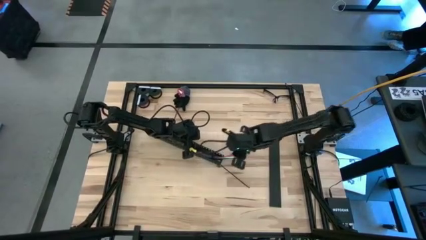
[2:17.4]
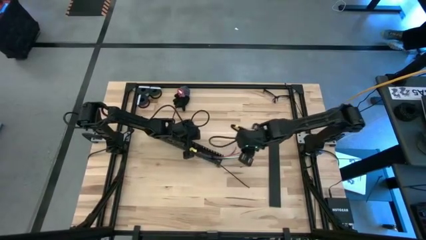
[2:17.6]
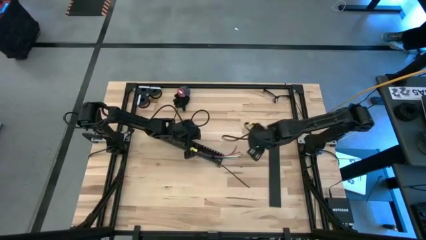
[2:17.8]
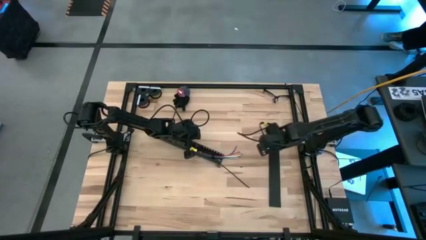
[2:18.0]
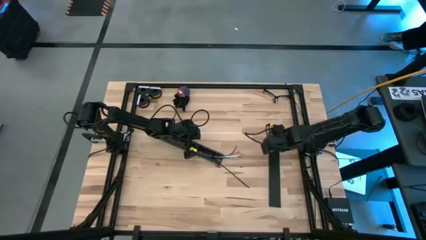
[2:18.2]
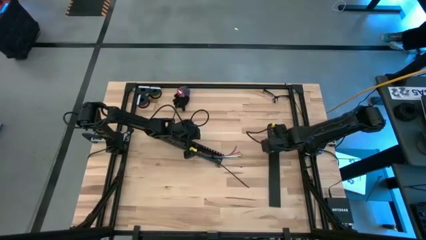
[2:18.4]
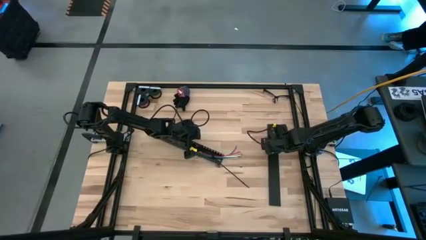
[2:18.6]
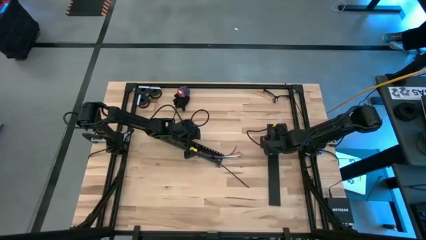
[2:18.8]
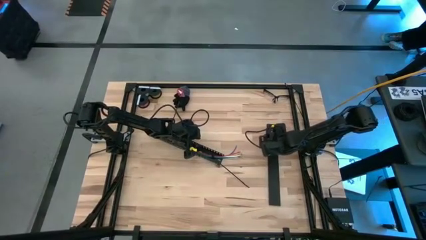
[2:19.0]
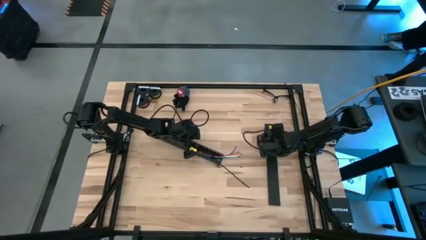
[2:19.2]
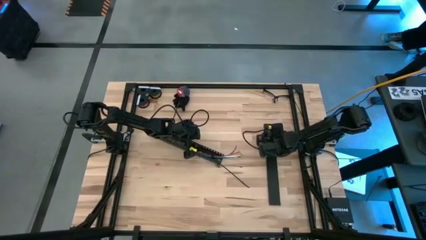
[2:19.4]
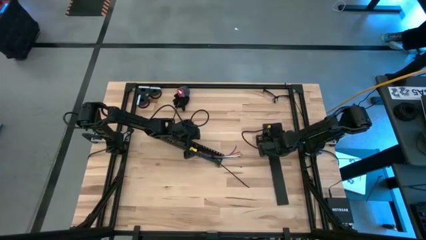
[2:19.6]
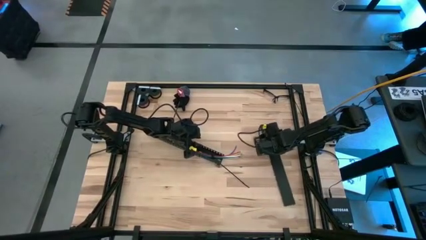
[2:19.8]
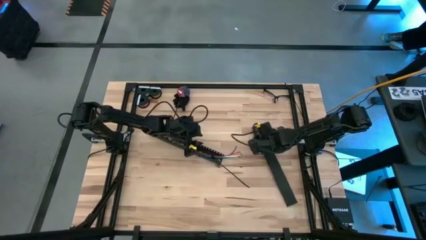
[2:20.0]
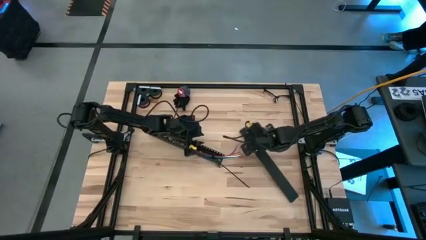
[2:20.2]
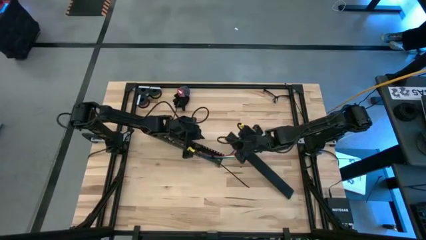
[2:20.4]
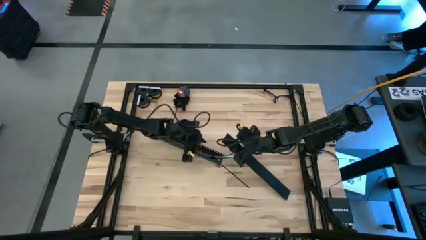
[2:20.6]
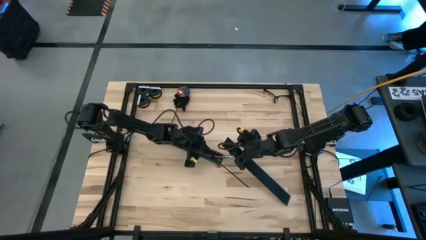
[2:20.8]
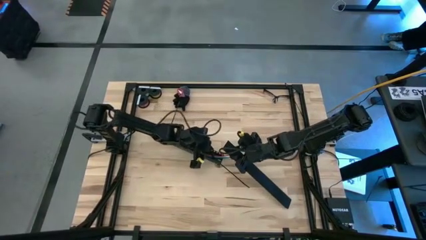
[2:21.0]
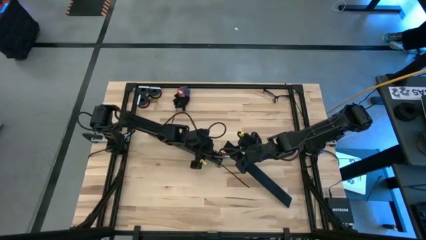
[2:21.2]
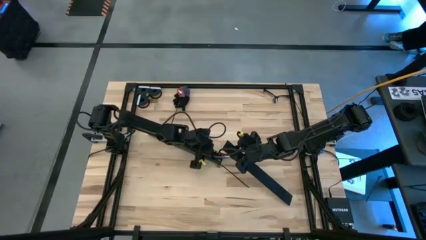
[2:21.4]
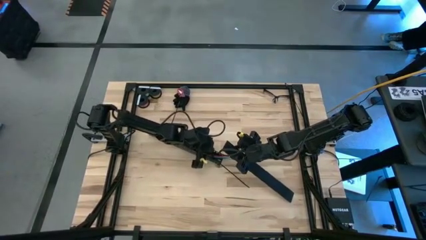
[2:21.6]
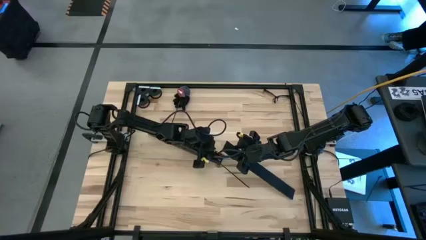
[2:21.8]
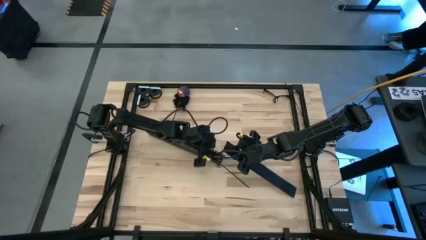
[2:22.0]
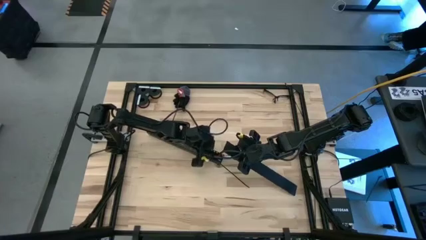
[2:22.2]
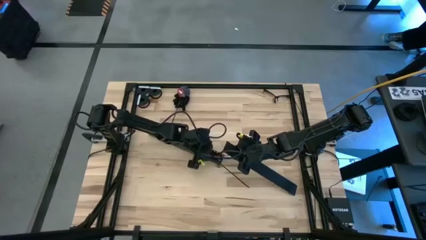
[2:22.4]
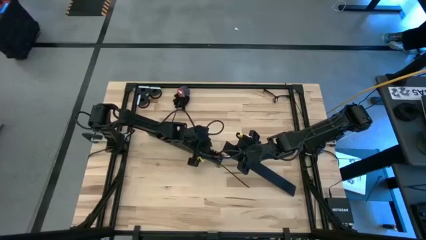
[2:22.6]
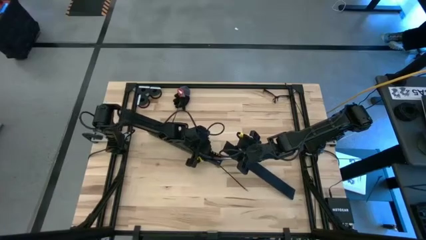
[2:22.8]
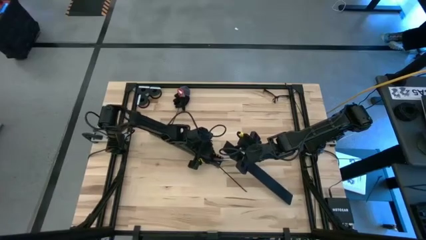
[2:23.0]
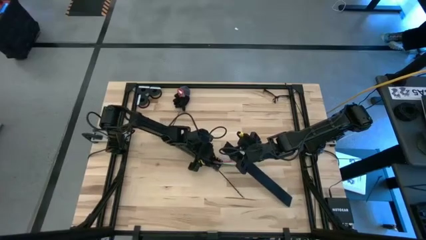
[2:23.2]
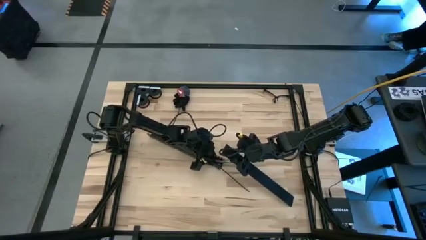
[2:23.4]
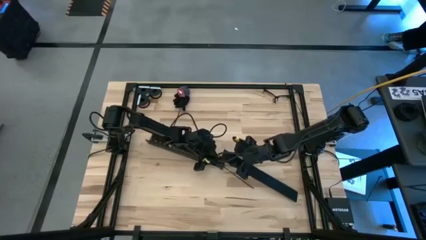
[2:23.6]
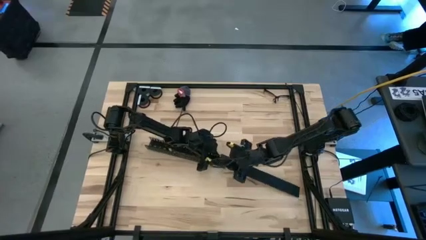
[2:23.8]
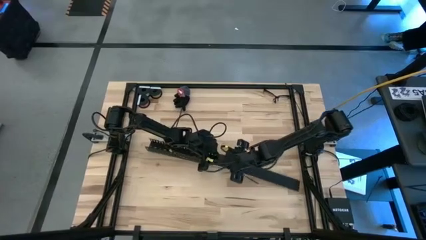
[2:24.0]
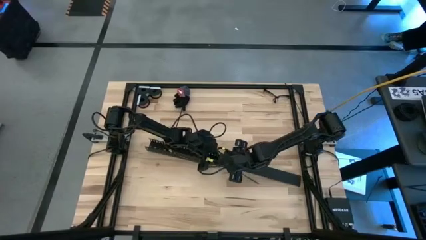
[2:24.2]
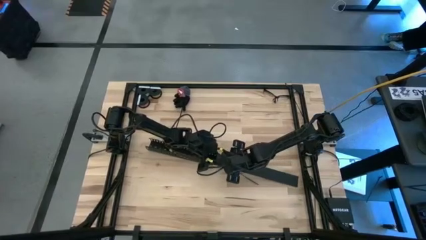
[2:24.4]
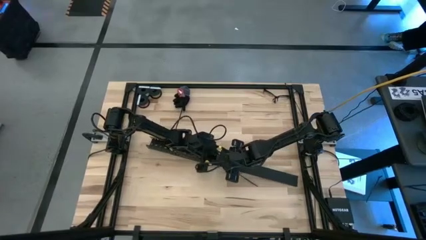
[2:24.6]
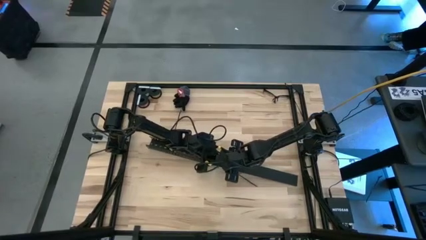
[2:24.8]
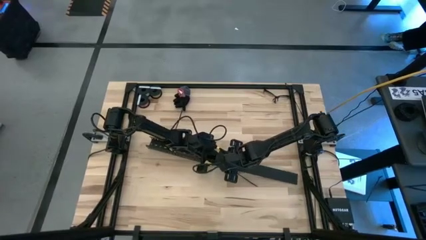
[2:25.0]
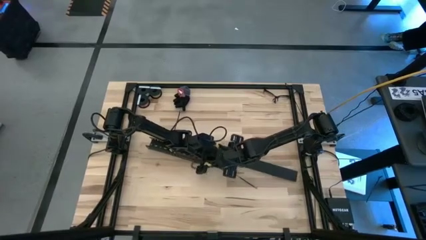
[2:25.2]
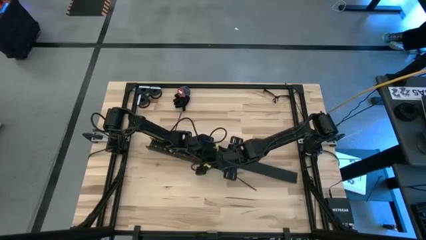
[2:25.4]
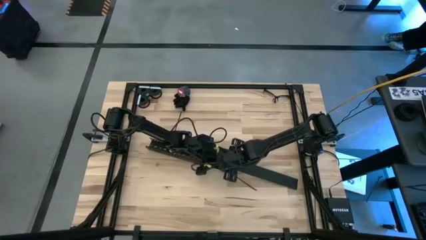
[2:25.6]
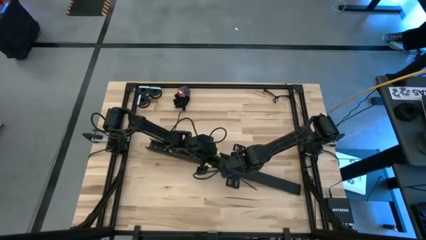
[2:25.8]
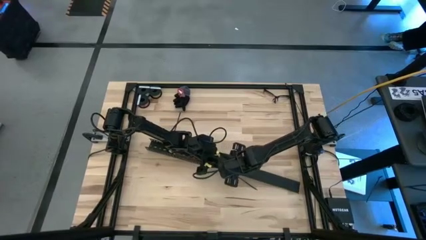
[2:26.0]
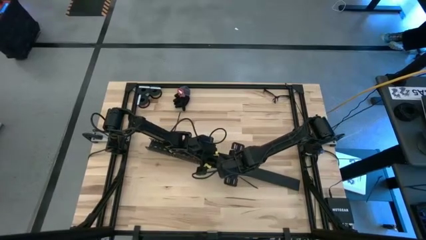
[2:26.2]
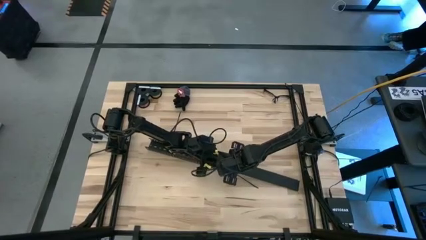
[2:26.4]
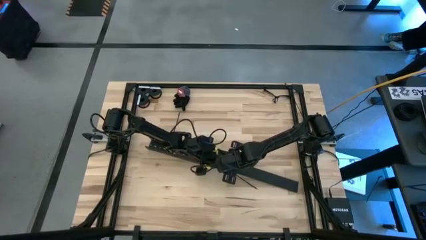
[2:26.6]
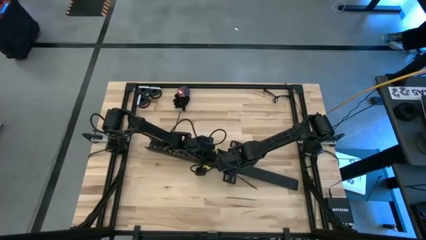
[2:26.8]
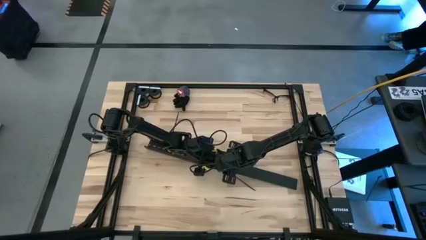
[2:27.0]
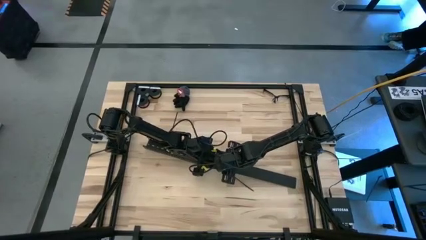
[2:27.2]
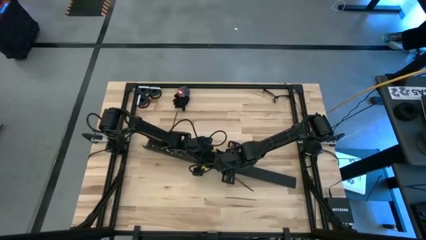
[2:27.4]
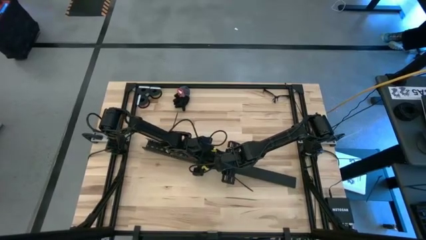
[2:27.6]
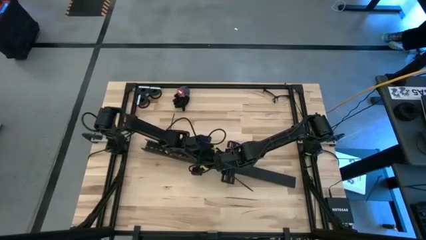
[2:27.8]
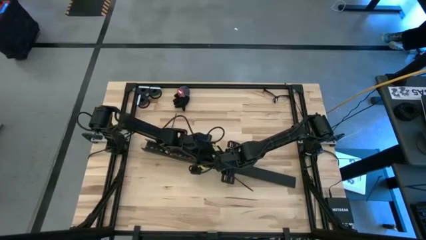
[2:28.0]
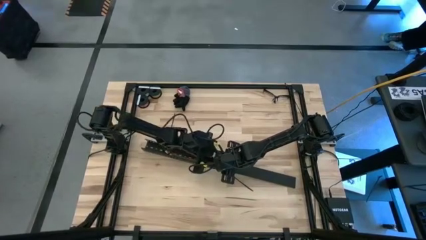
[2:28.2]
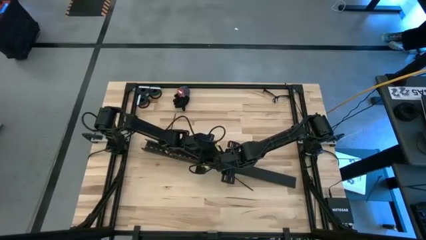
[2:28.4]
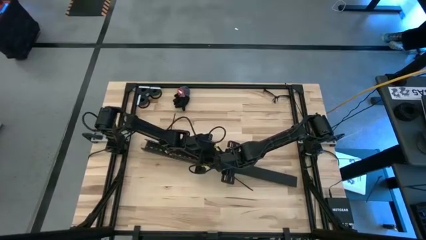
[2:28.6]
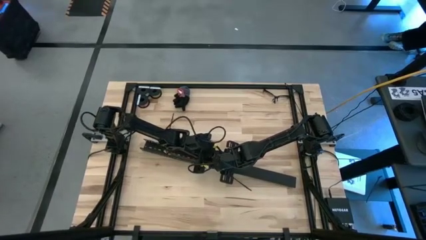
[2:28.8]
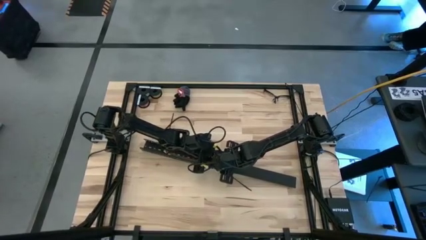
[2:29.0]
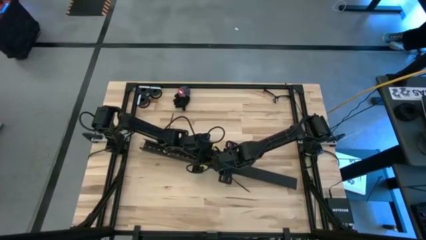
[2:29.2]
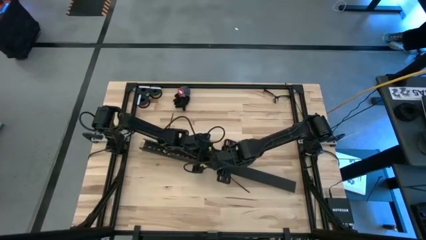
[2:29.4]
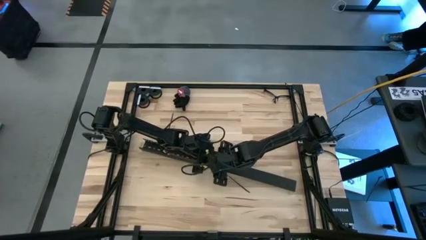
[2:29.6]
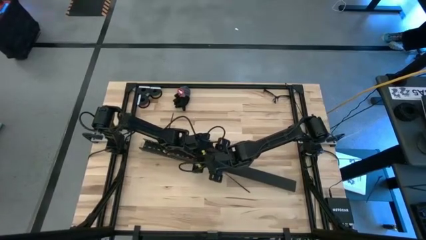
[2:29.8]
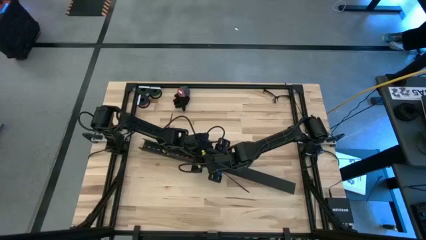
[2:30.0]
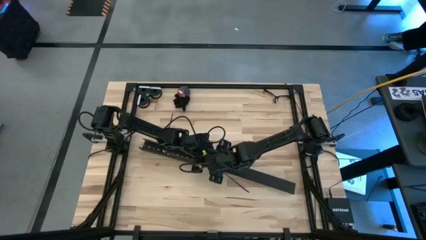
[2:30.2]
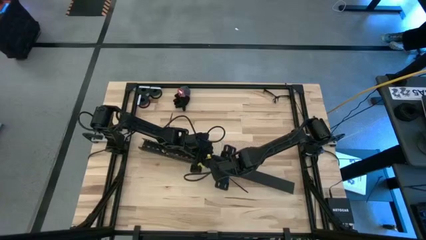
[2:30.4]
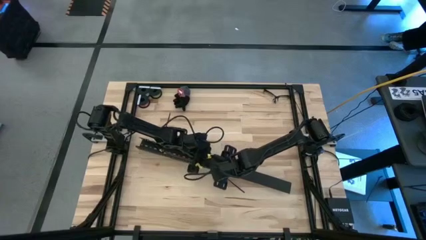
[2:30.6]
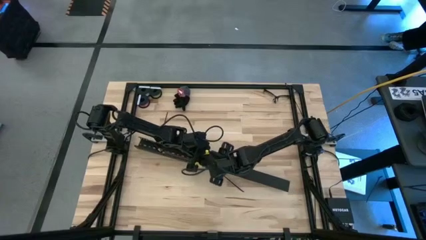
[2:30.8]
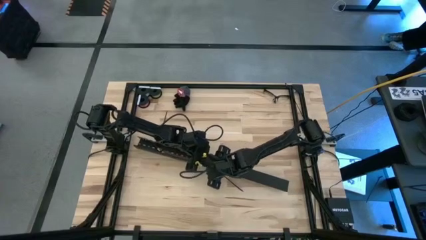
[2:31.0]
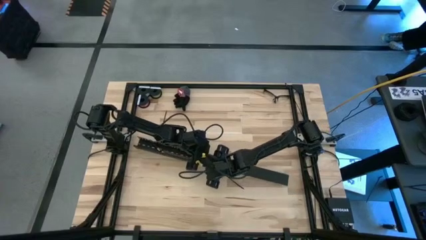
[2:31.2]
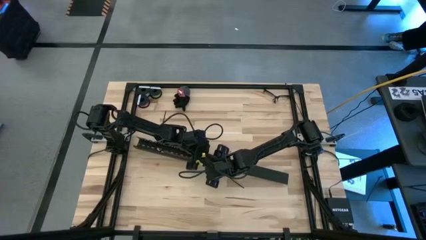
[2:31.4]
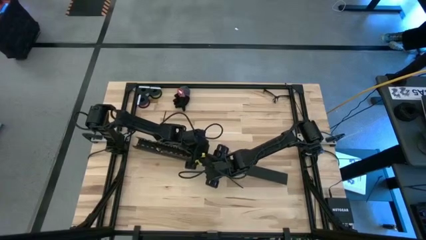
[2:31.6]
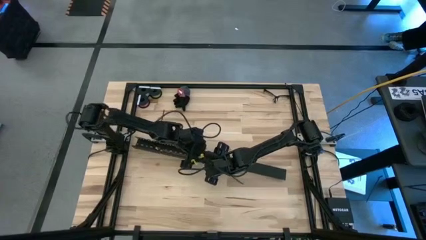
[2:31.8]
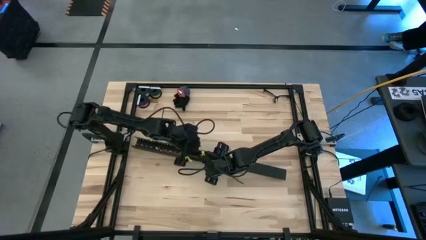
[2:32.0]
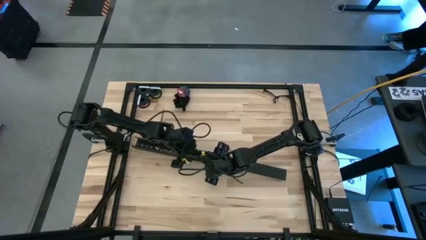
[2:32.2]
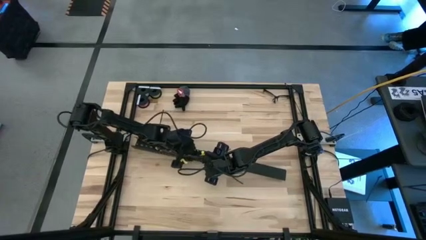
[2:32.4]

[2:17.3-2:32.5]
Task: Ziptie cables
Close the black cable duct with the cable duct cover
